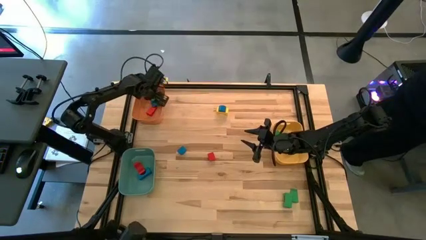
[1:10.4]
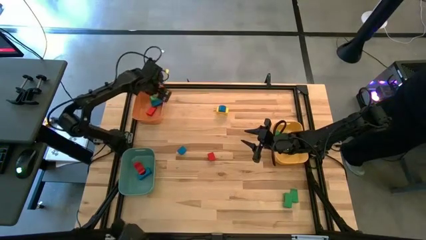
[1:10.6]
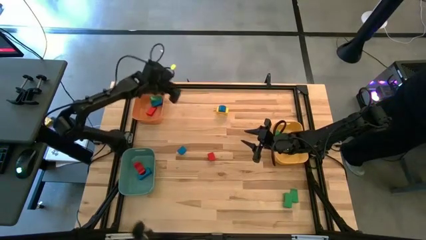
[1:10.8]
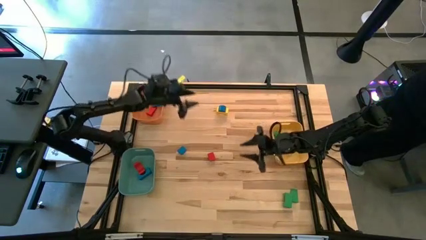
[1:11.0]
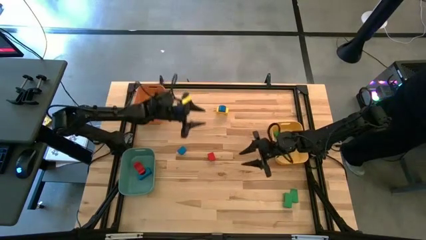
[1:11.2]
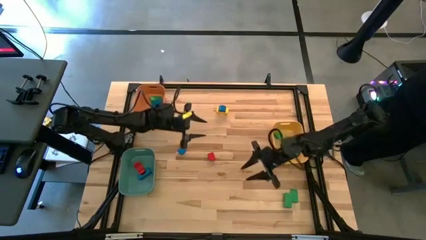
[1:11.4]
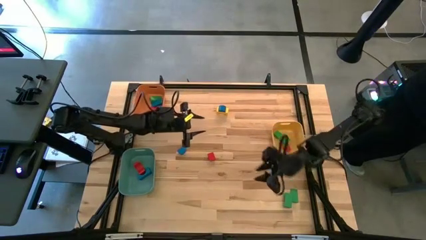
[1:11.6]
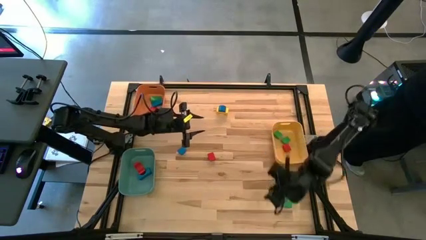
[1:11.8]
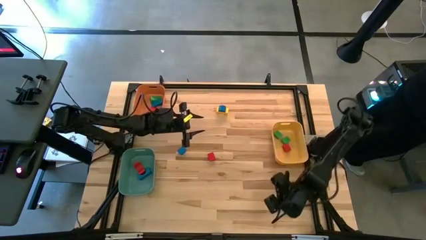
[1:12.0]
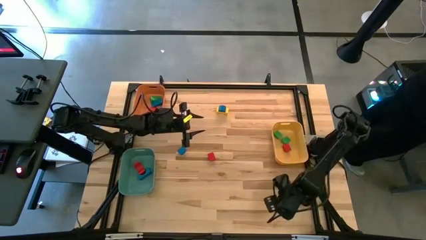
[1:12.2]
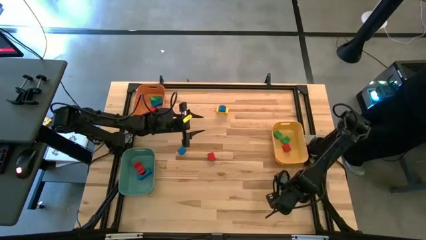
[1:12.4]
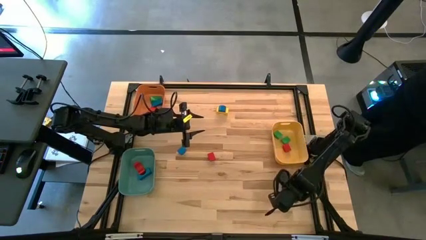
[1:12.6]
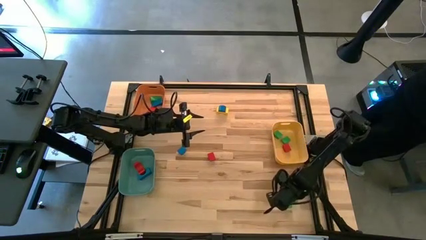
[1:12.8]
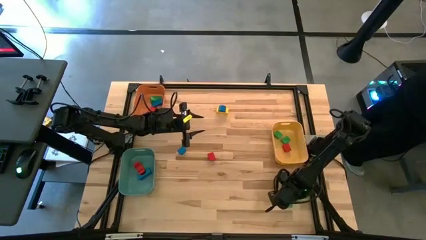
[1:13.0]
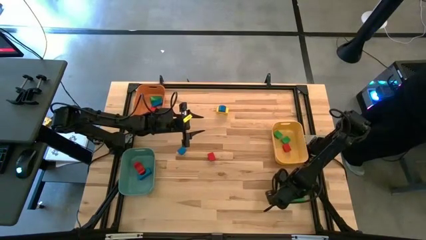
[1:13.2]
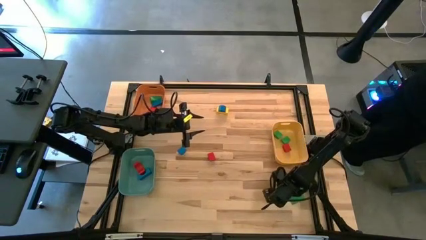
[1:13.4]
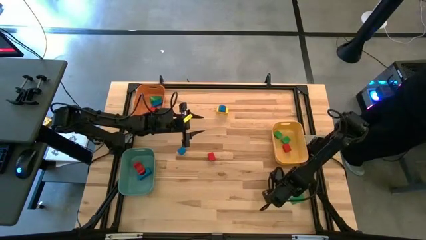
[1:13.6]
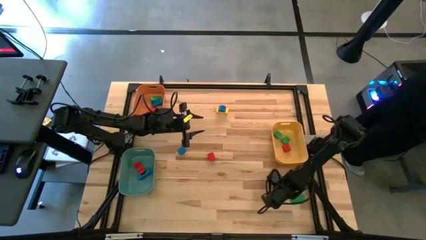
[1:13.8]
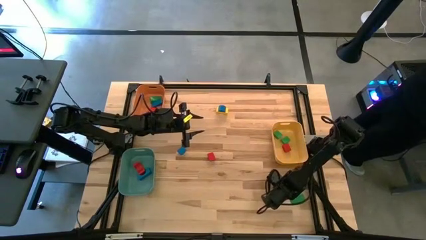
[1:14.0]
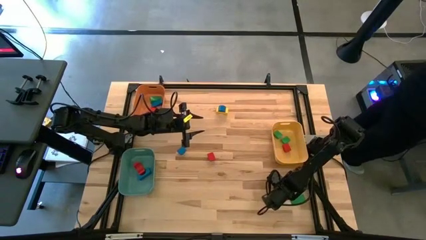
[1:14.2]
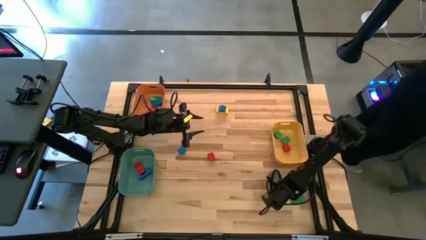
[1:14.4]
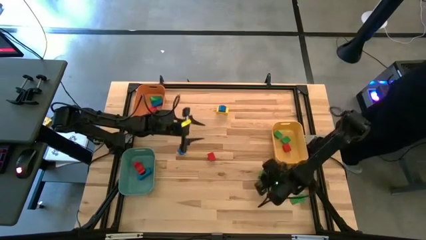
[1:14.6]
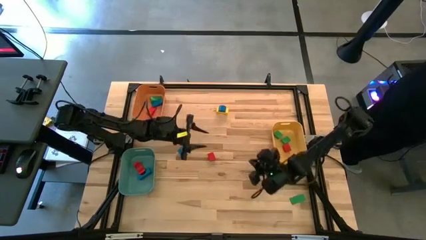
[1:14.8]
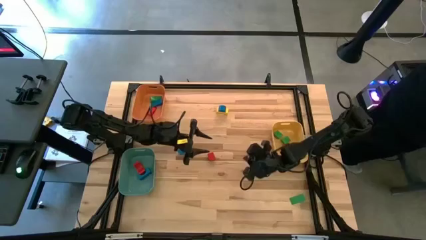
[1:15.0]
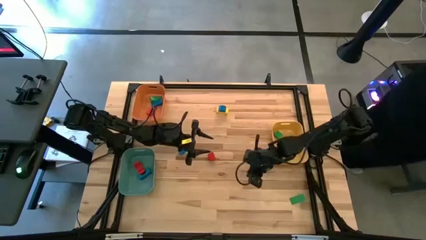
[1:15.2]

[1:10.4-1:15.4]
Task: Sort blocks by size
Put the green arch block into the blue bin

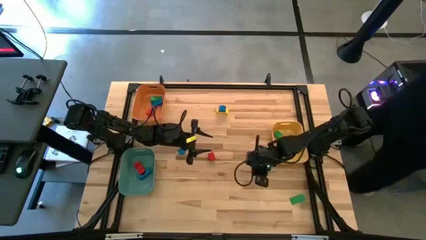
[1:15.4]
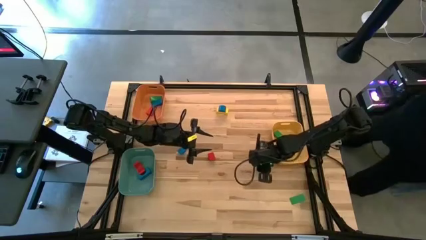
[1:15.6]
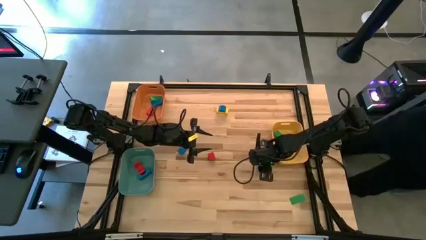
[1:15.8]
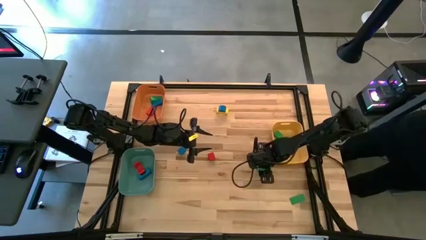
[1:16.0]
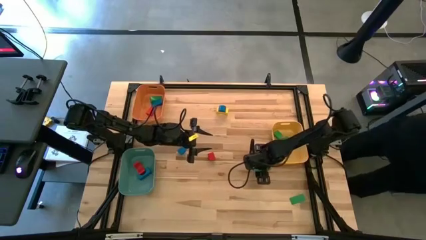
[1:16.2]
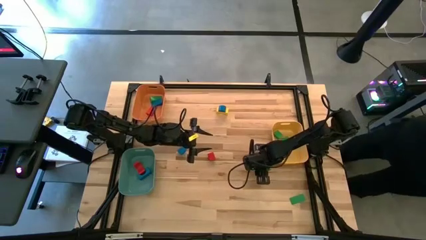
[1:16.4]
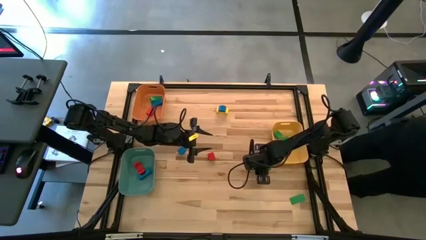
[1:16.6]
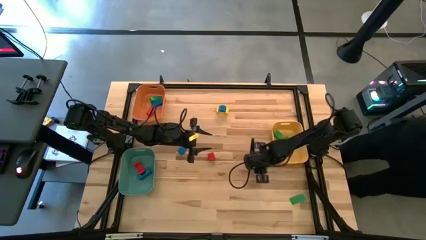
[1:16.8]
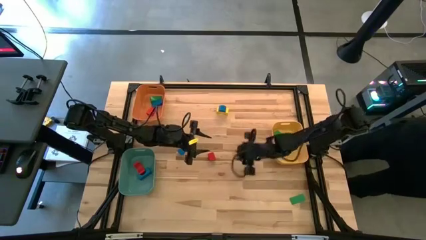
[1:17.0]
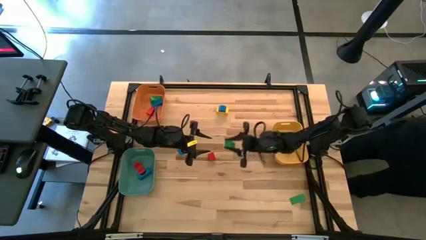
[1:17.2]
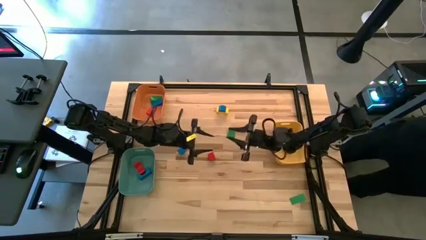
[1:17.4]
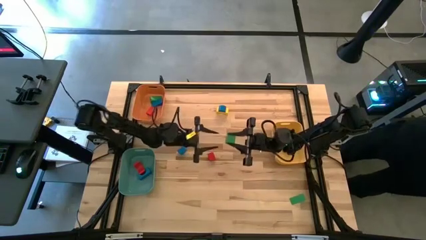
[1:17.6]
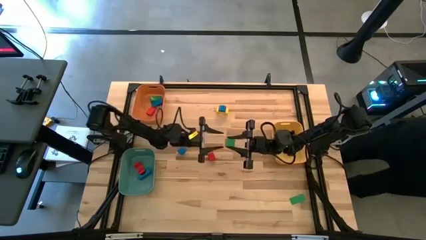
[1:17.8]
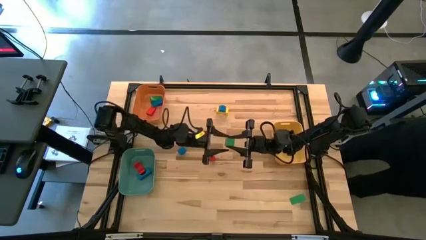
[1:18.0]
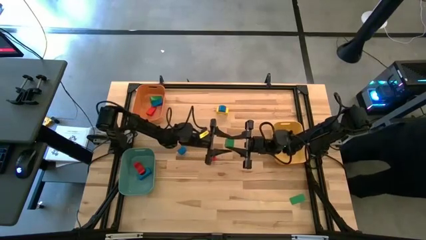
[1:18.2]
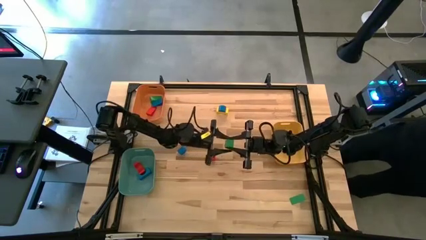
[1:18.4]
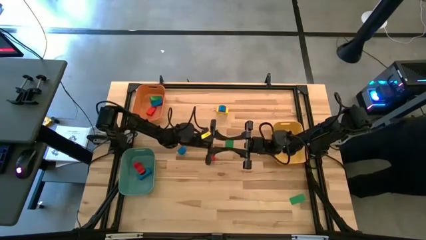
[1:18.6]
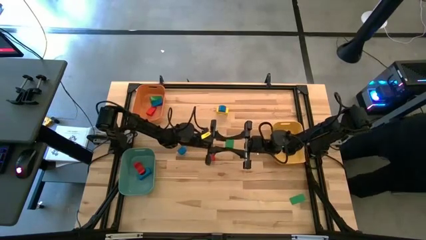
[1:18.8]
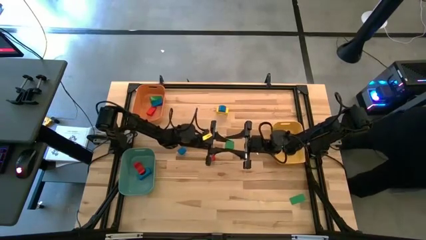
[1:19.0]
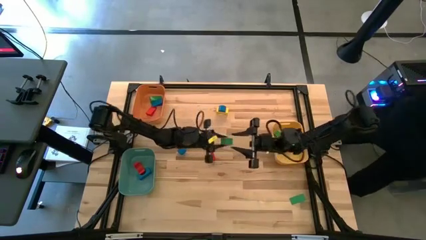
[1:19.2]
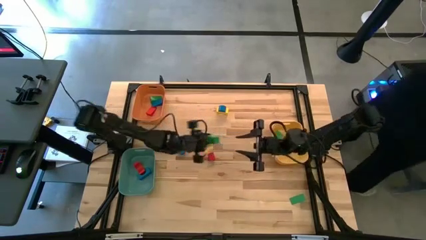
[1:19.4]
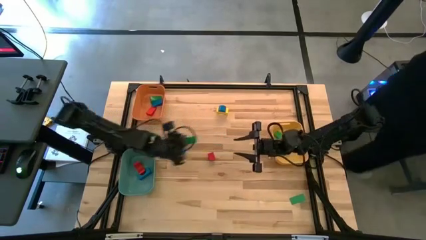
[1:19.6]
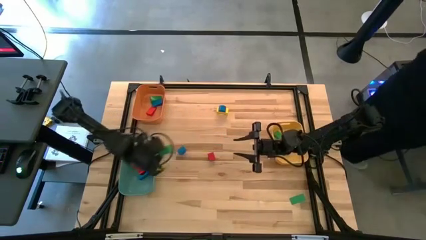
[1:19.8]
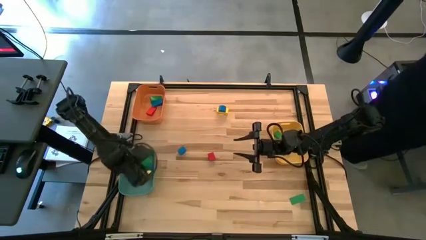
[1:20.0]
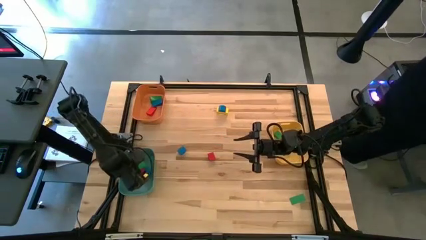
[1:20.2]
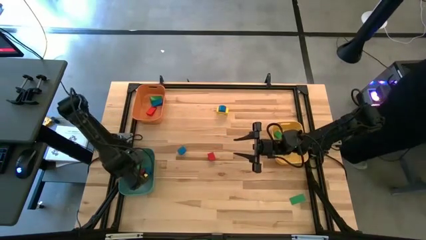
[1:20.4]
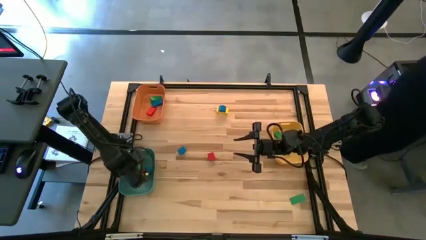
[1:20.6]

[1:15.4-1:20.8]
Put the green arch block into the blue bin

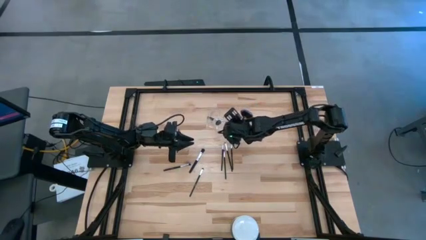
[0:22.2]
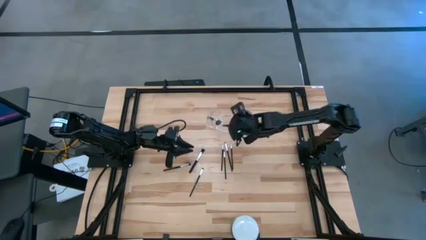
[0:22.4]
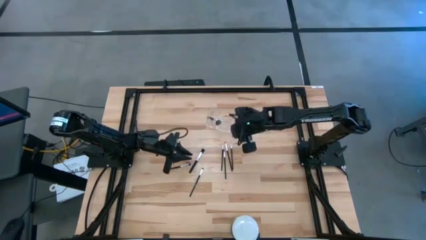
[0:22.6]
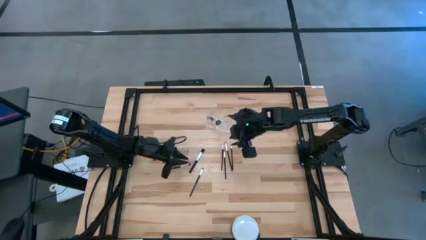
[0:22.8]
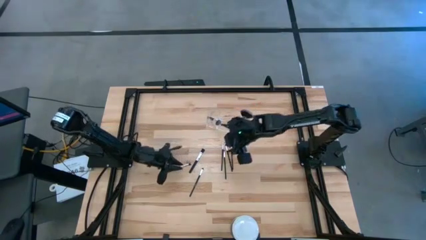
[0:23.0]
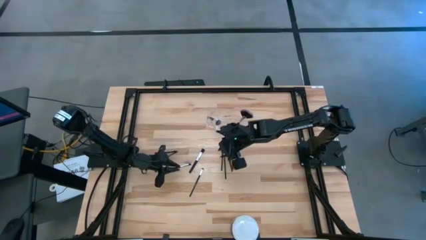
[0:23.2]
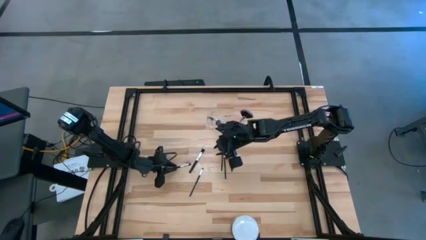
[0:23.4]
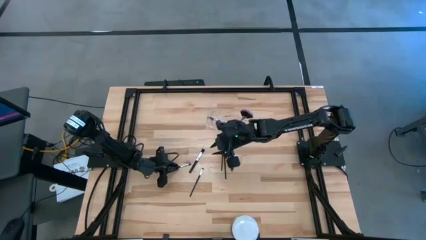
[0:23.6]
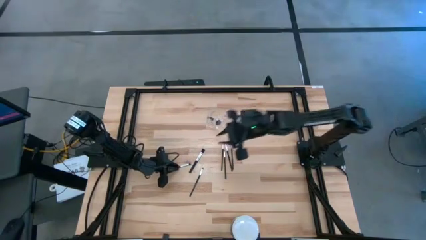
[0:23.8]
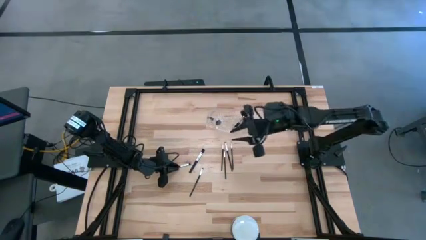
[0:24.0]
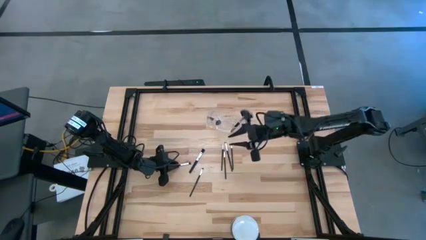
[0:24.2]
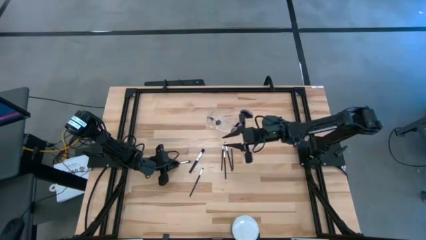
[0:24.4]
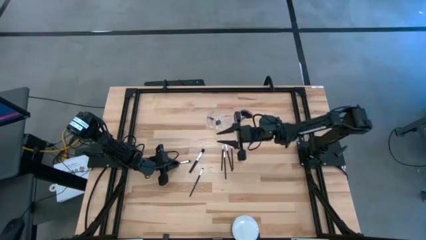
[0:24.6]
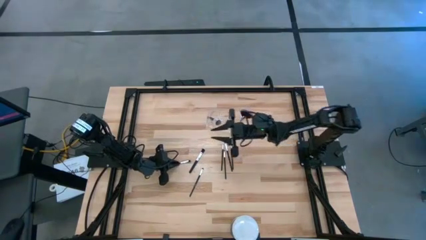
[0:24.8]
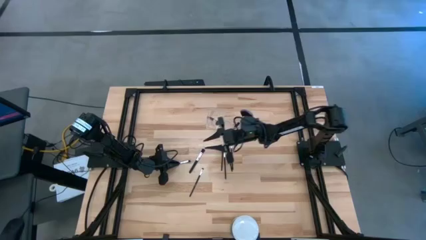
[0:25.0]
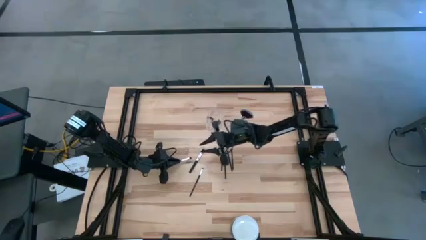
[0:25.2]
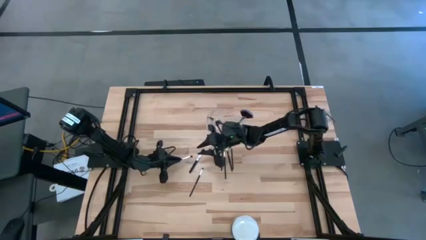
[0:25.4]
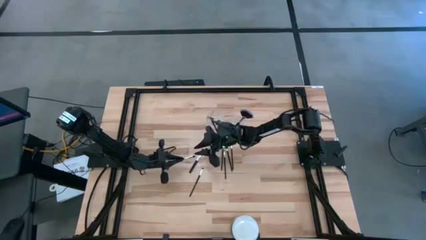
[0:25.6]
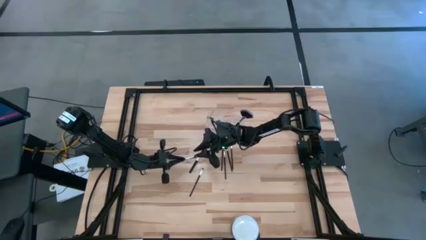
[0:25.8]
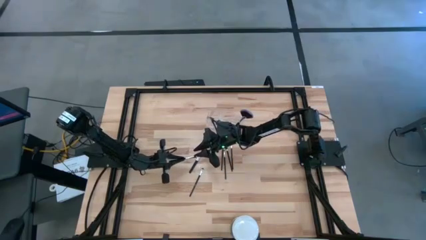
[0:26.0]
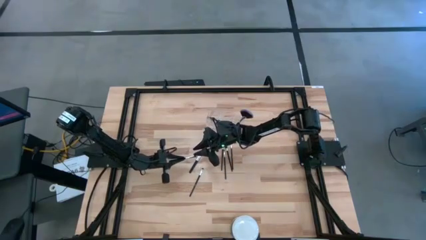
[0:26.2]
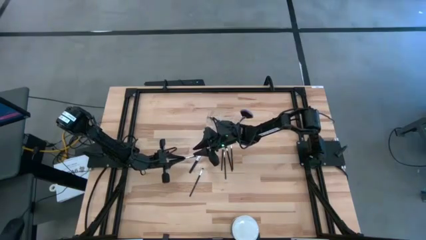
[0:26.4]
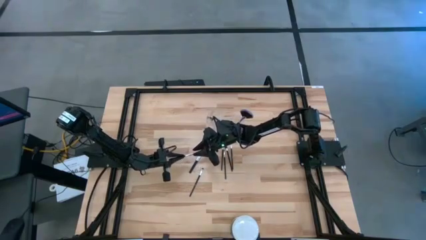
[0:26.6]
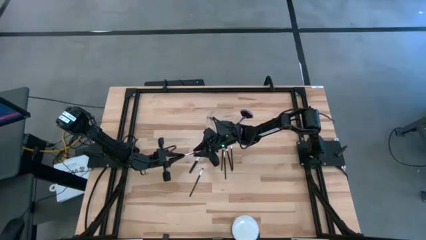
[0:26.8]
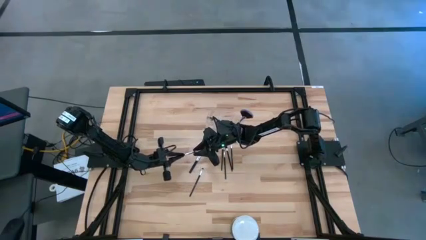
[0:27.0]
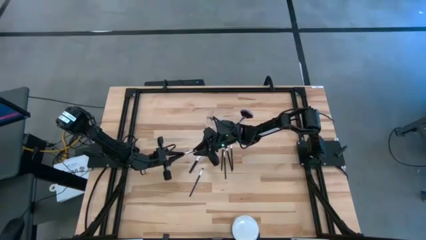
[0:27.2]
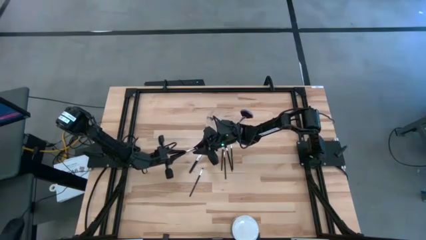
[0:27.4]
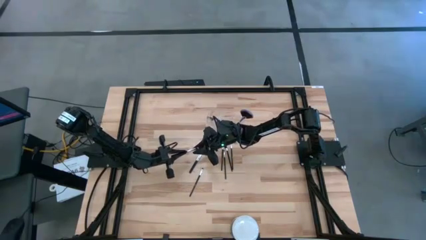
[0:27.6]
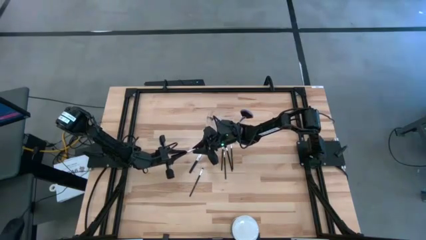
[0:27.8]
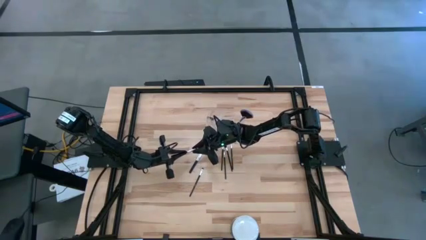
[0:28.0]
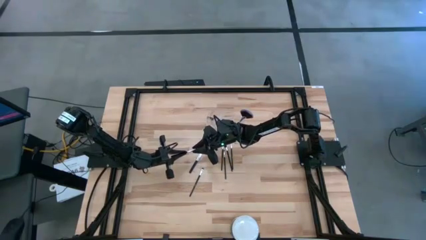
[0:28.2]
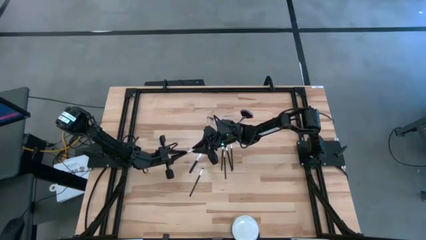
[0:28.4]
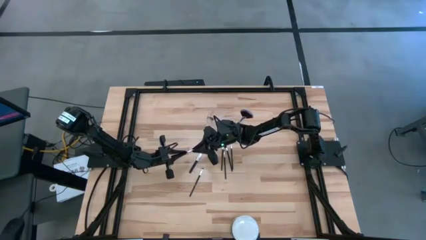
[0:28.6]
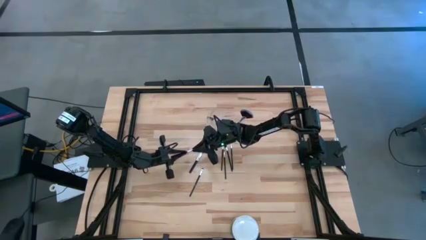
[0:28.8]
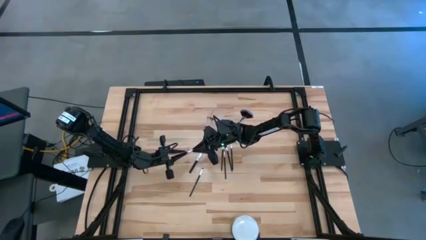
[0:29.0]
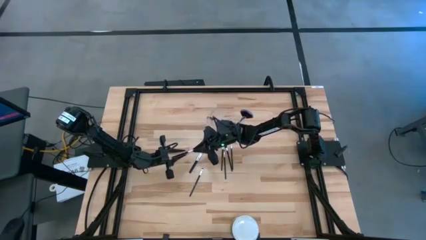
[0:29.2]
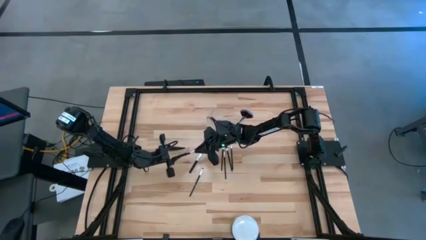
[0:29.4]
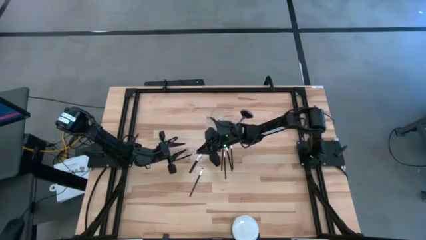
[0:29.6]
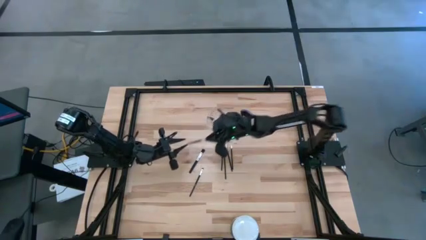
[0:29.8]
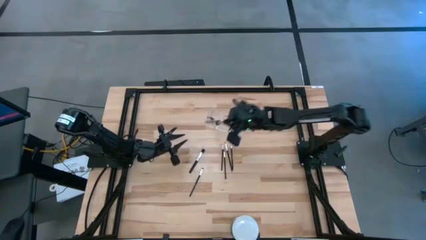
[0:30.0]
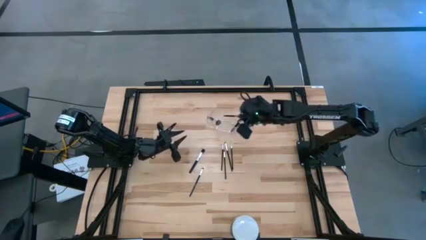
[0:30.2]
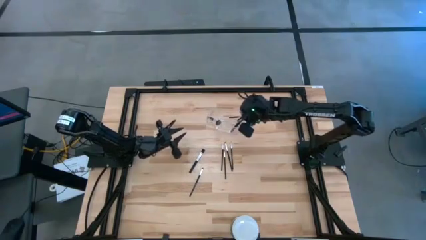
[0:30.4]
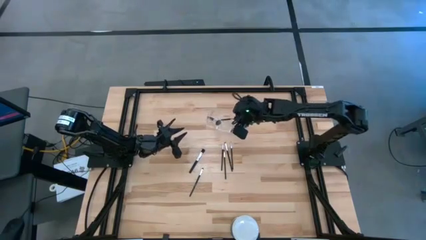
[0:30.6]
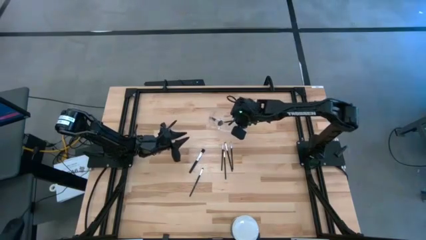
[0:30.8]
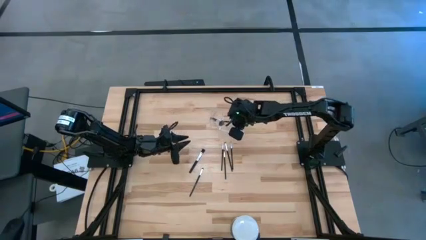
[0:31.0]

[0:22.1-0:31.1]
Task: Put items in baskets/containers
Put the black eyeshadow brush into the transparent organizer
